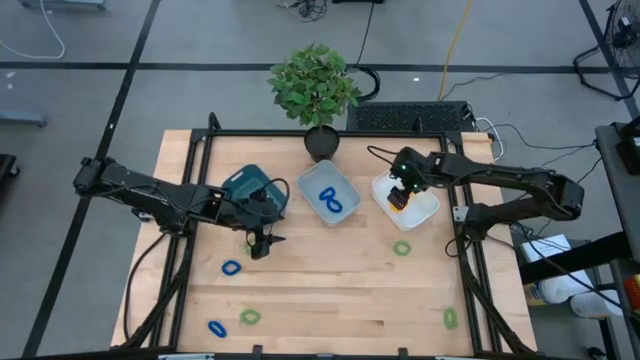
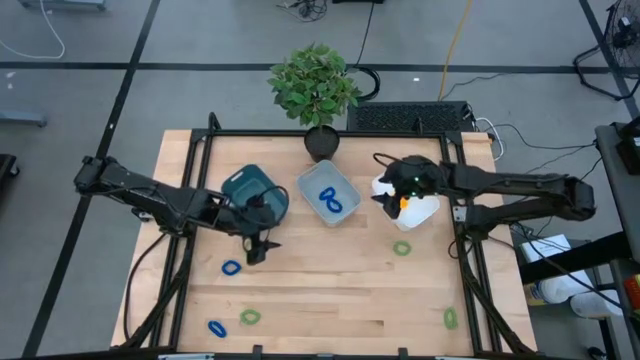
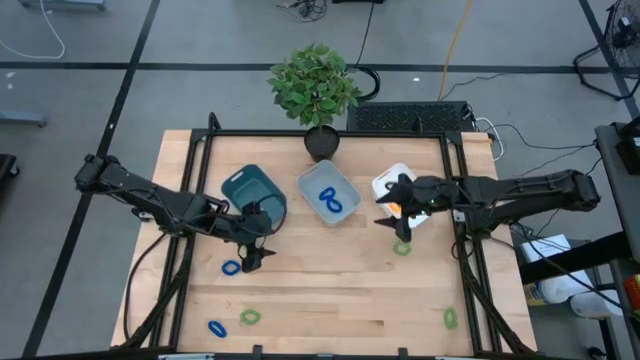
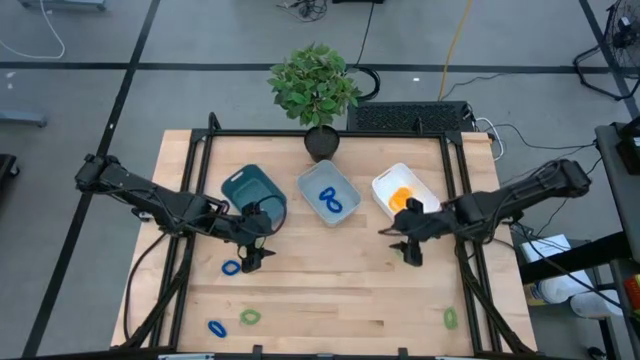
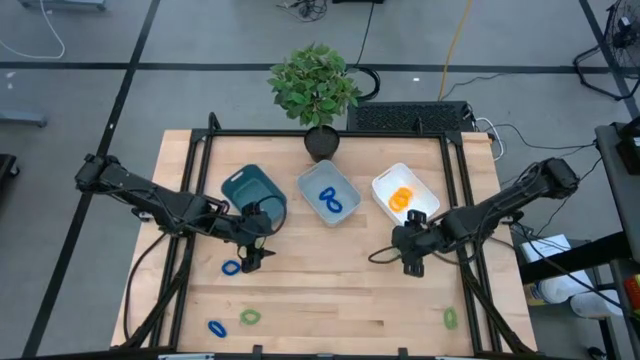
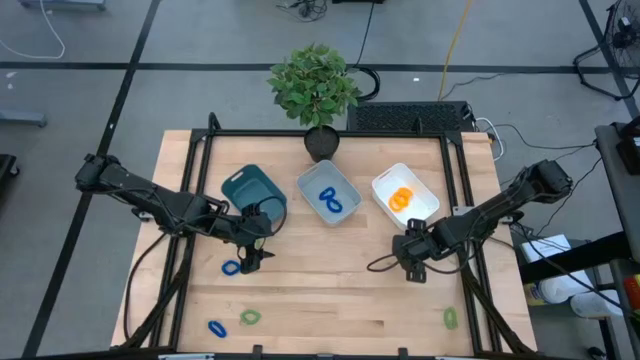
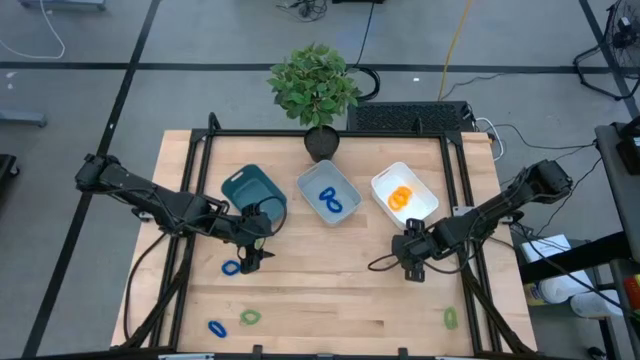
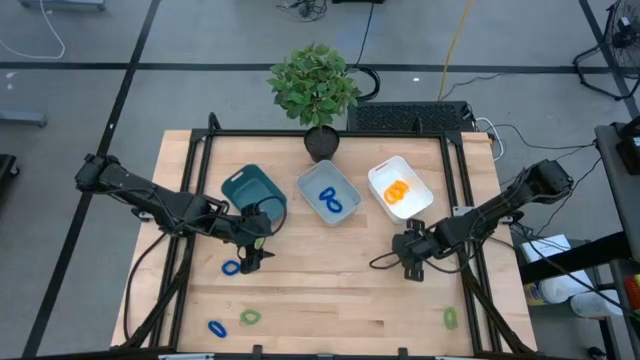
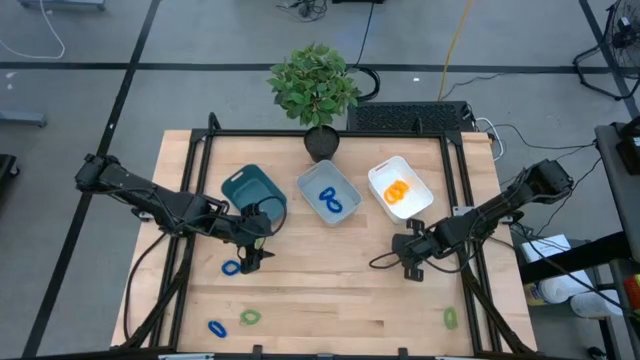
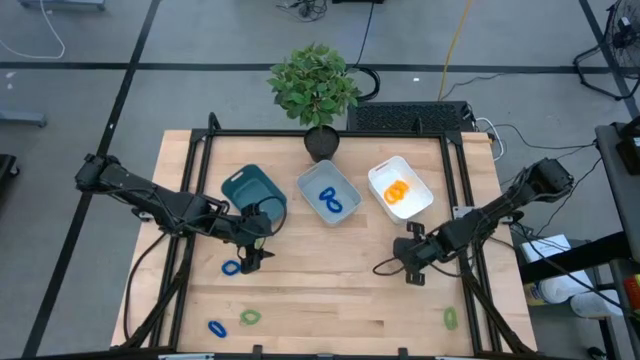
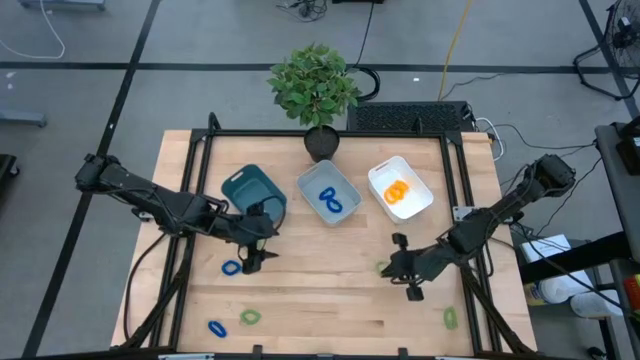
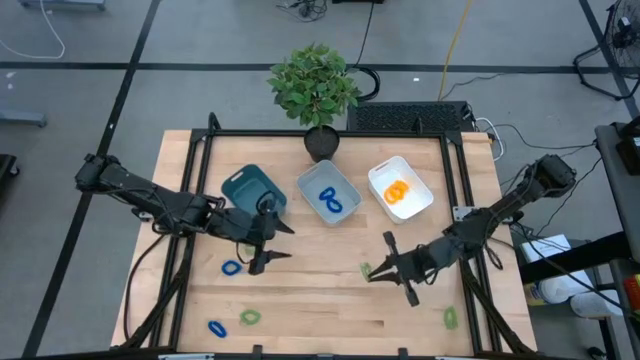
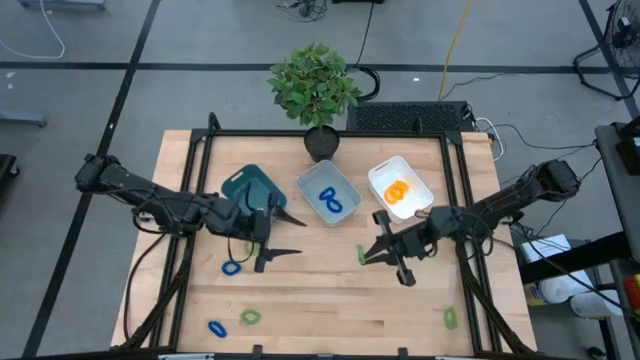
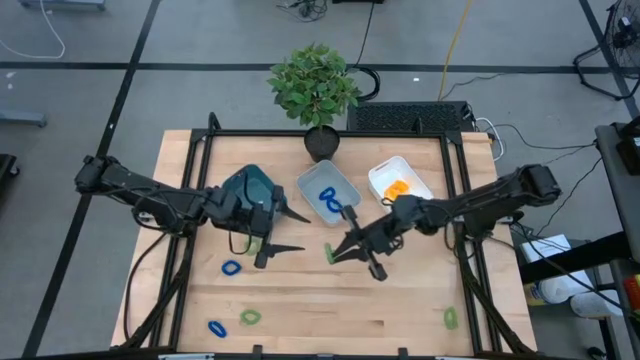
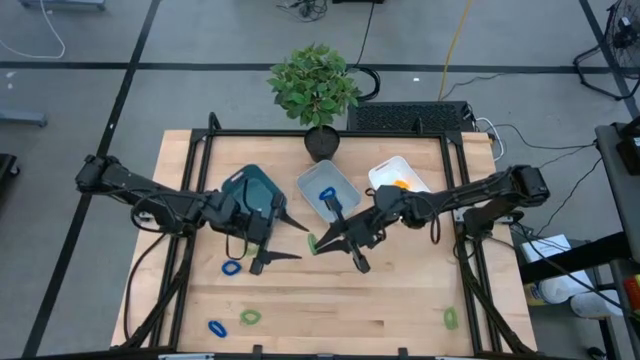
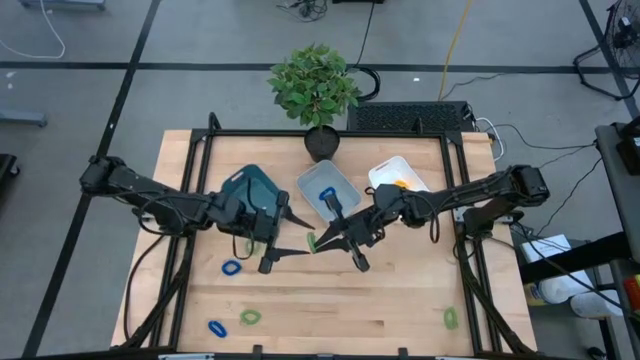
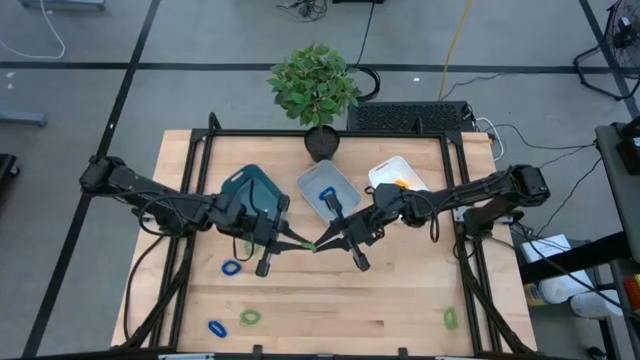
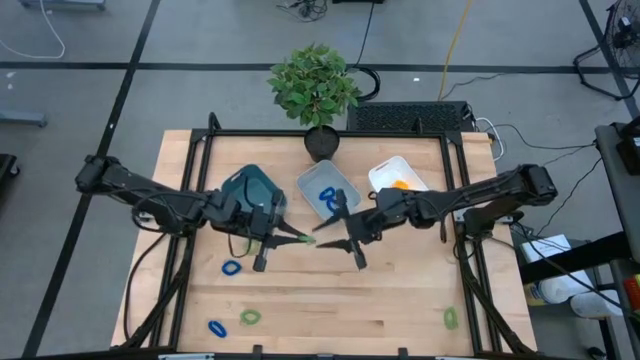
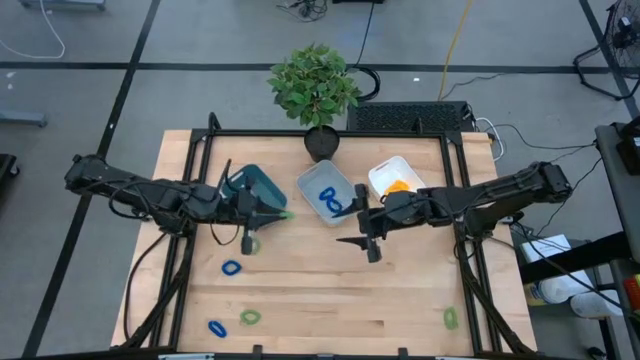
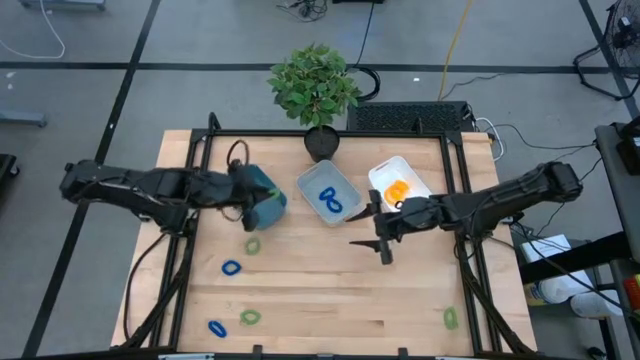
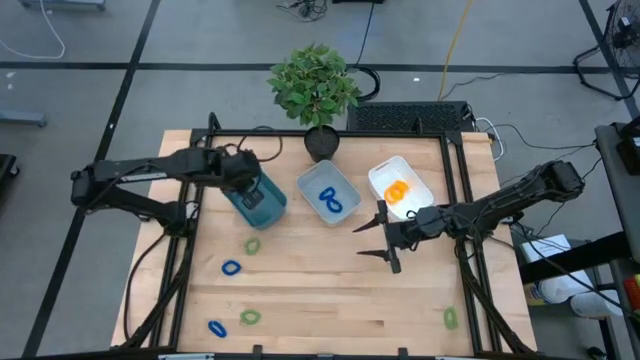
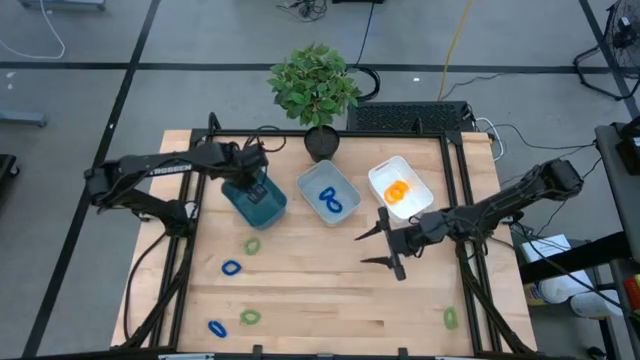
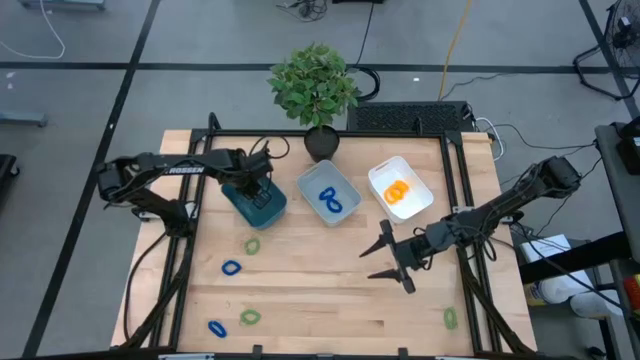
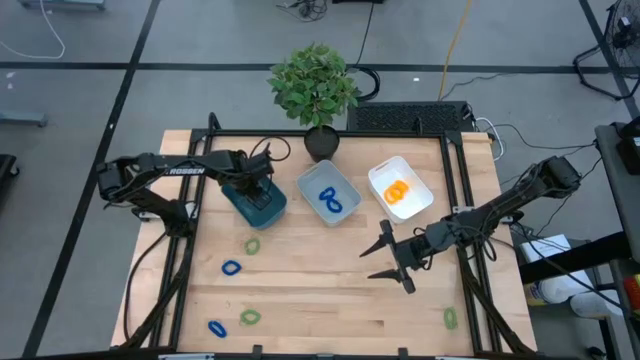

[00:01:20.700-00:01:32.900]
Task: Sort spring keychains
Put the top right green spring keychain into the blue bin

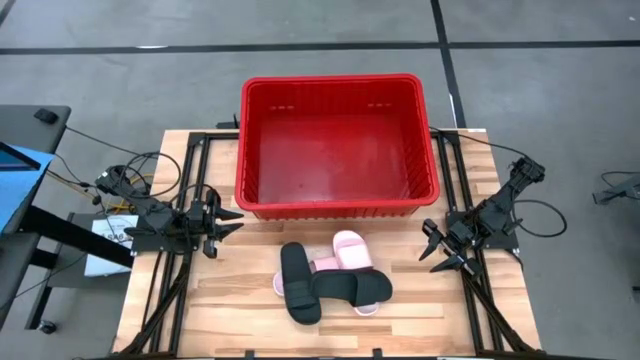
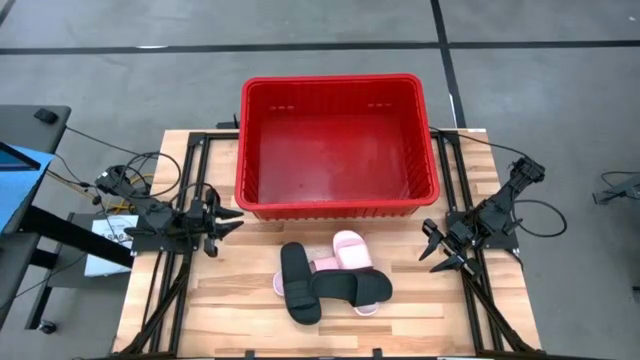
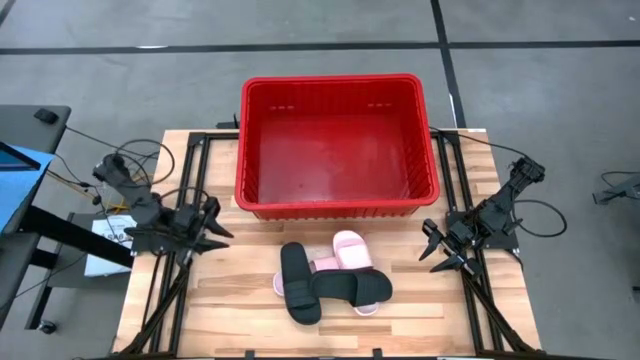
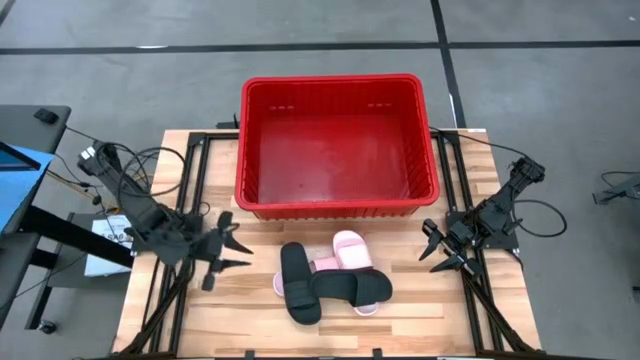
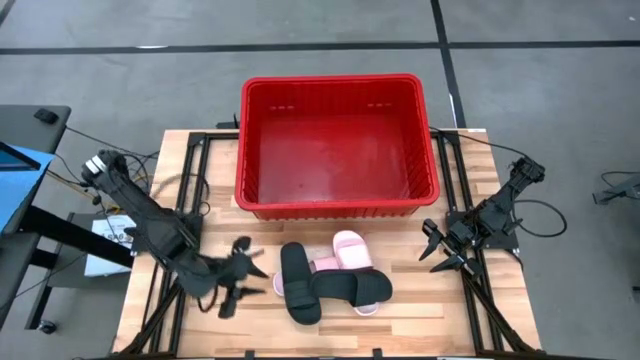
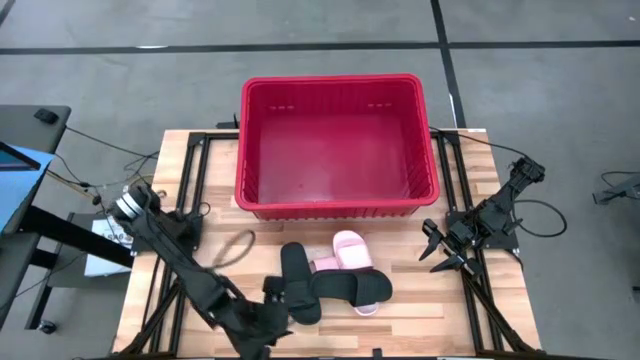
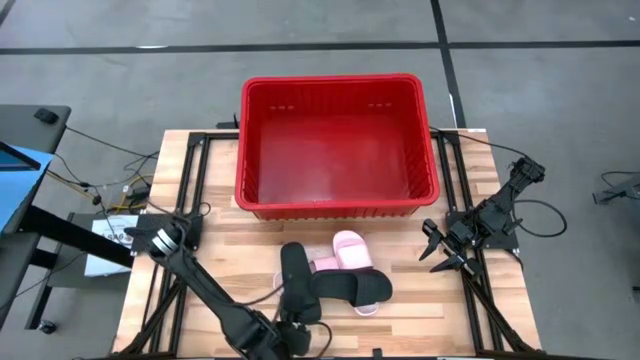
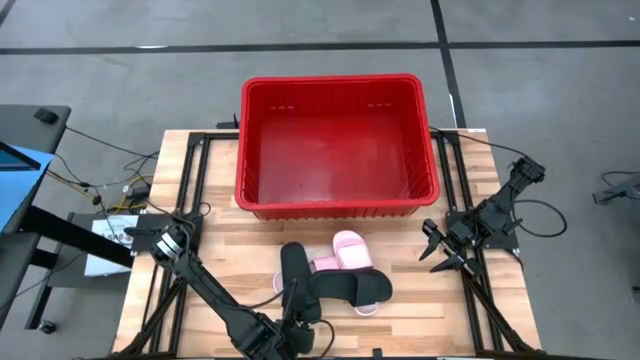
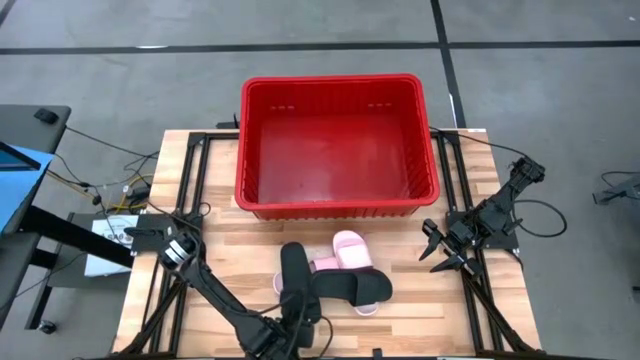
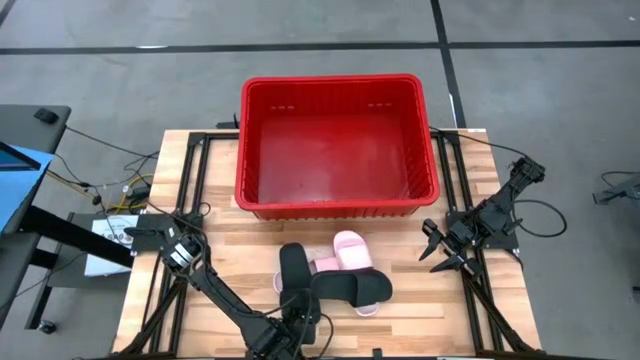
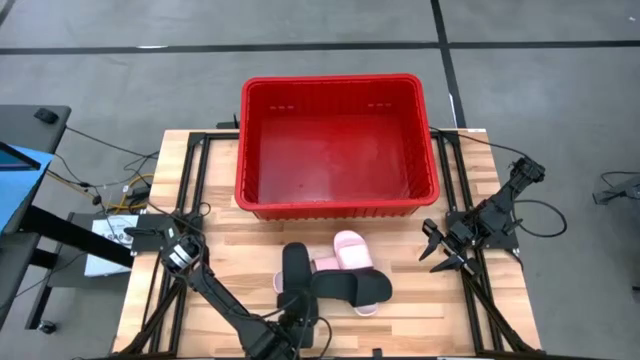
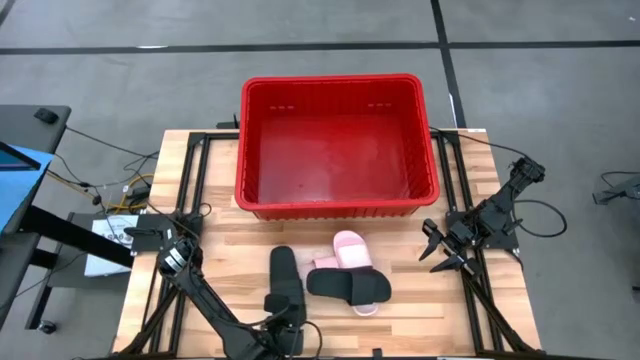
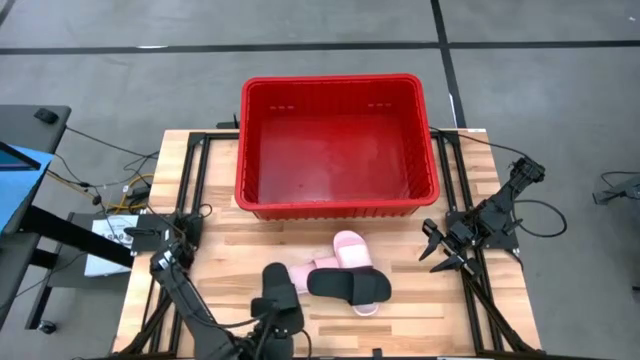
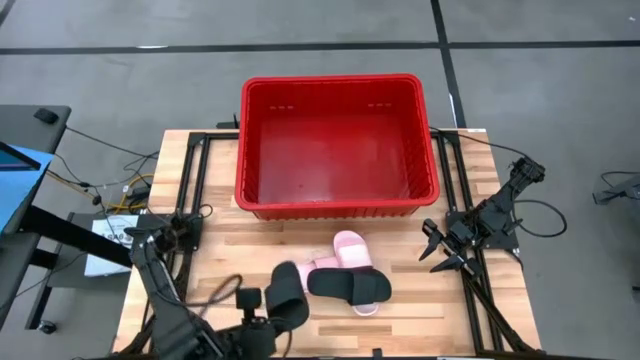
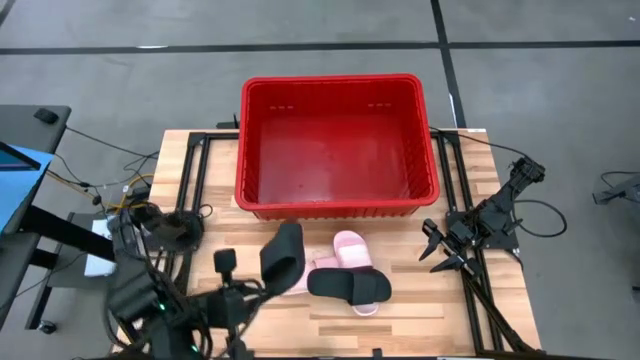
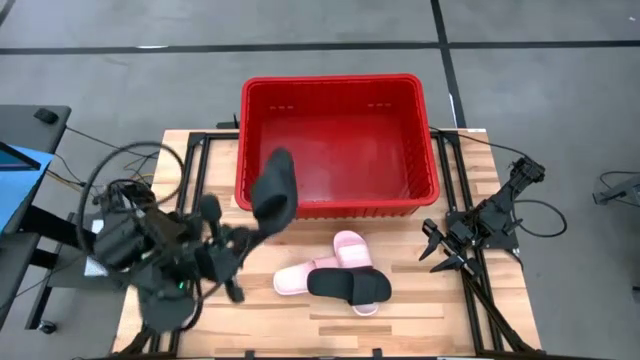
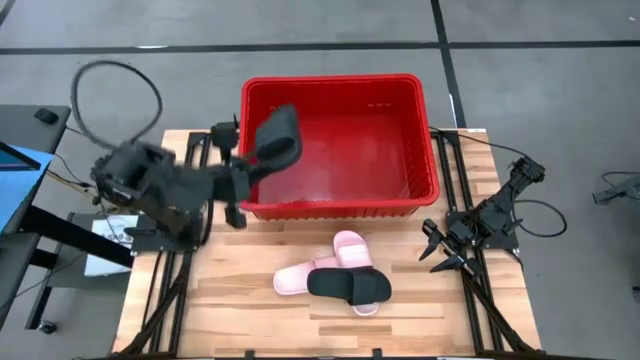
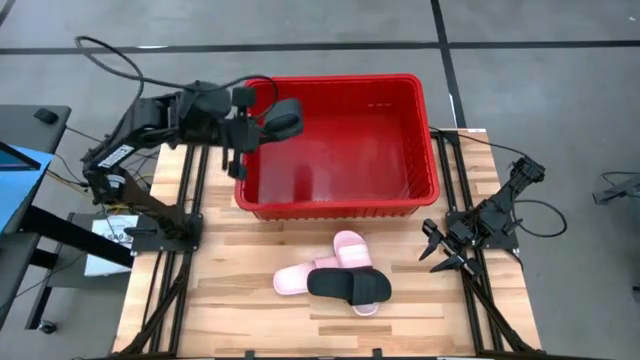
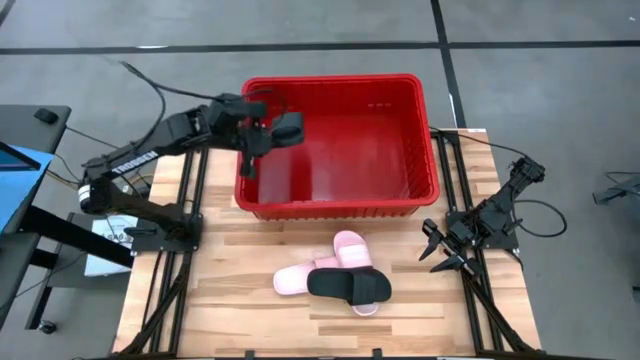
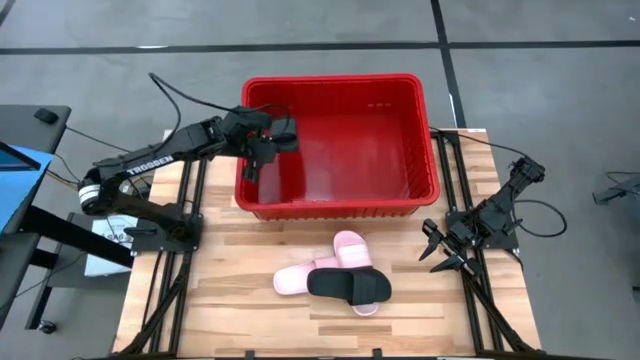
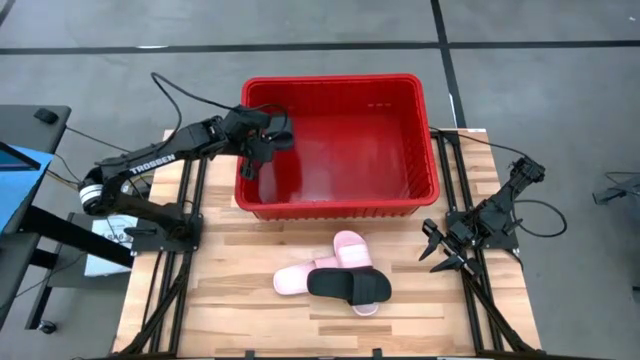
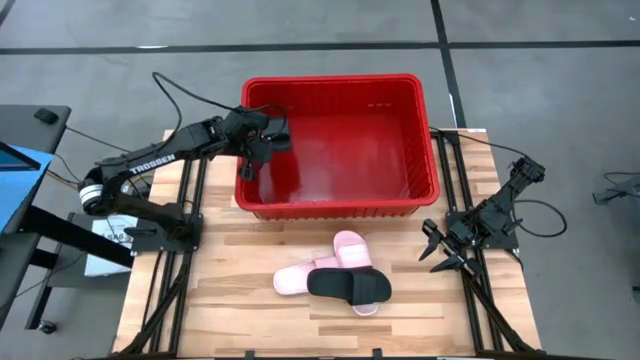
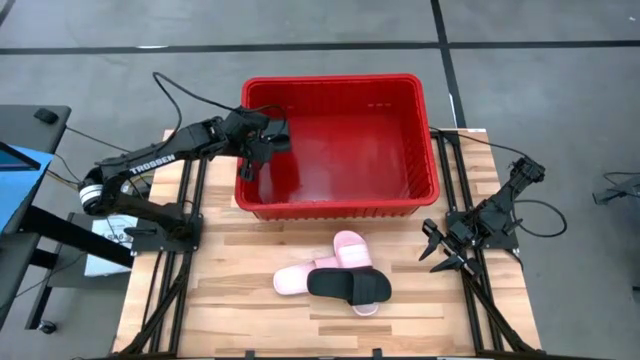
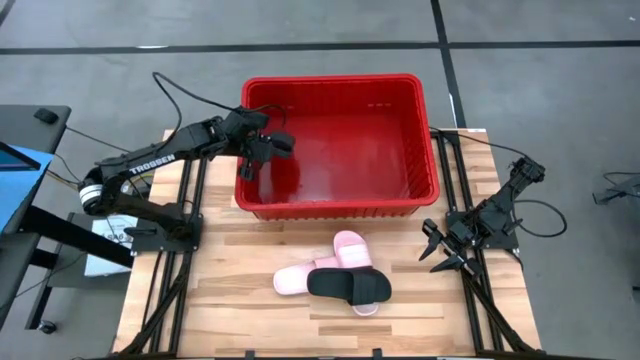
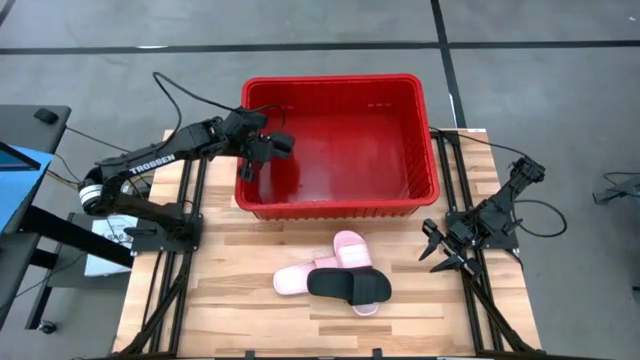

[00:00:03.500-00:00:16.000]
Task: Pick and place slides into bin
Put the left black slide into the red container
